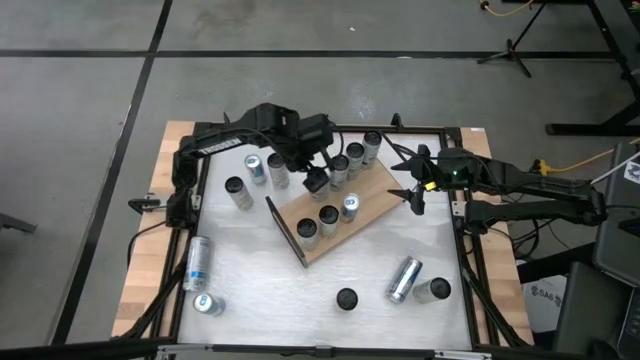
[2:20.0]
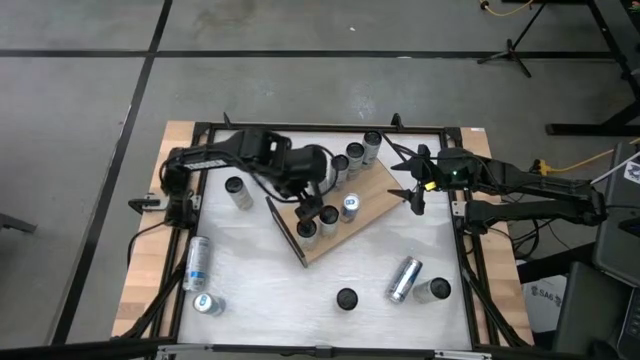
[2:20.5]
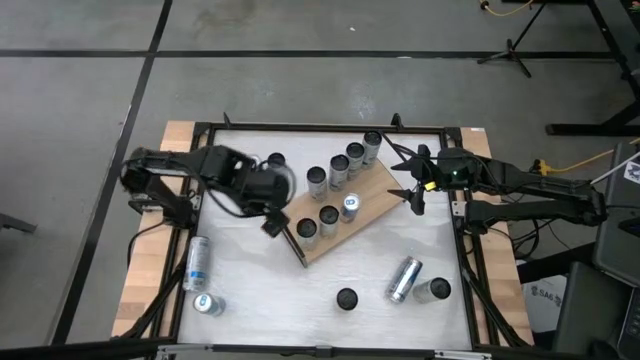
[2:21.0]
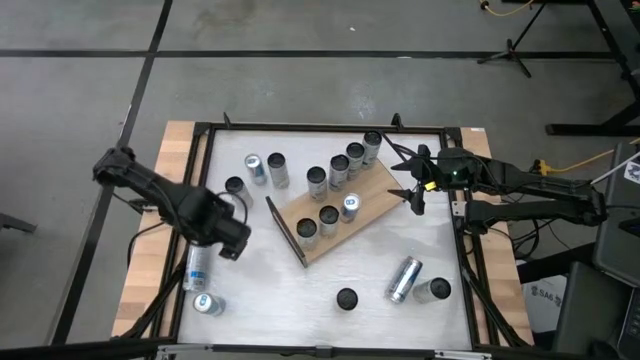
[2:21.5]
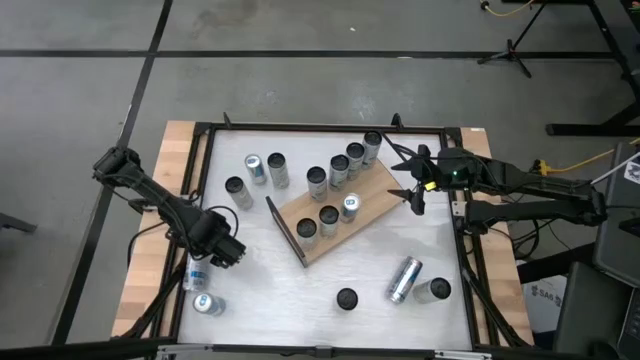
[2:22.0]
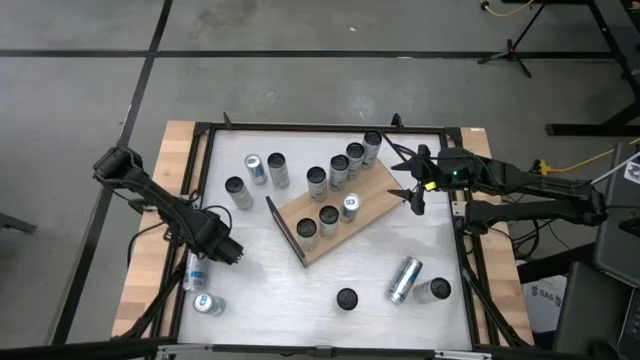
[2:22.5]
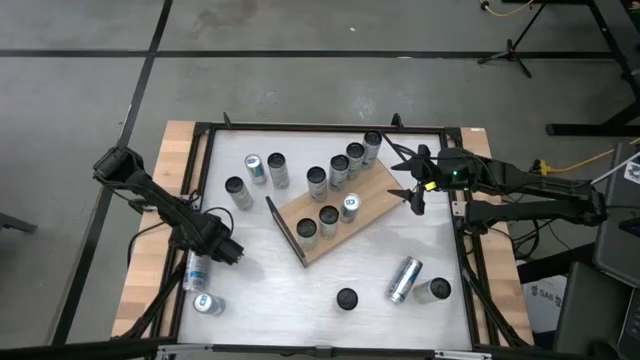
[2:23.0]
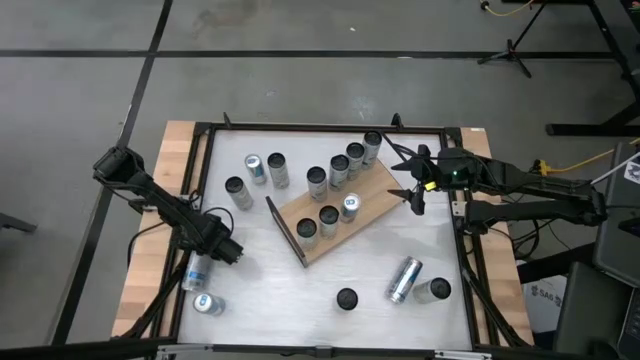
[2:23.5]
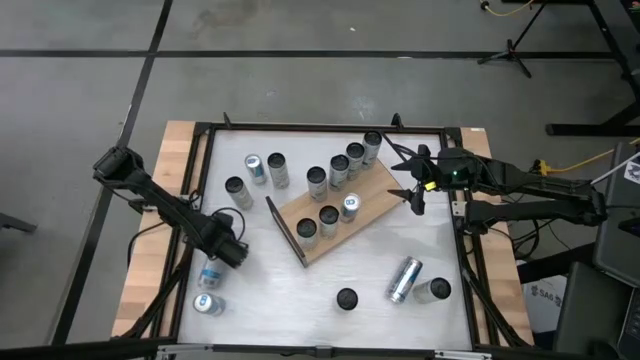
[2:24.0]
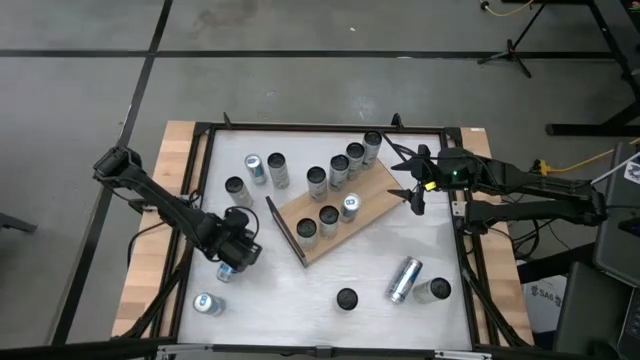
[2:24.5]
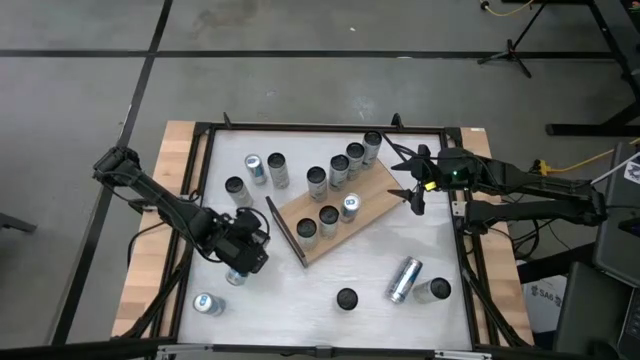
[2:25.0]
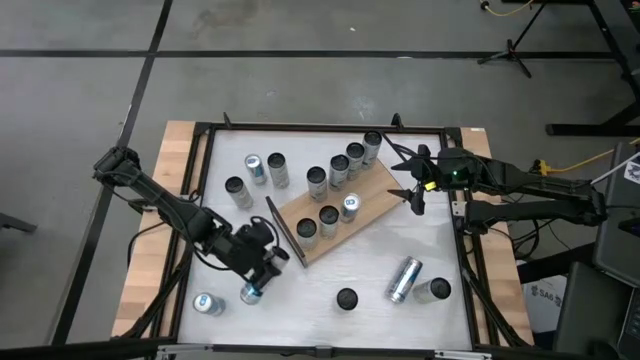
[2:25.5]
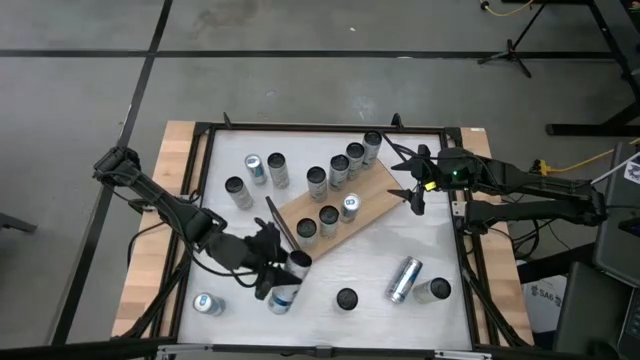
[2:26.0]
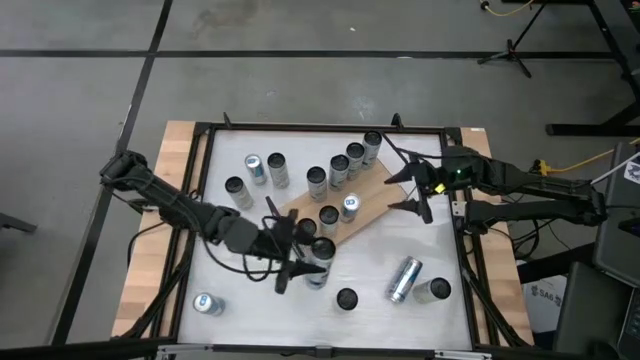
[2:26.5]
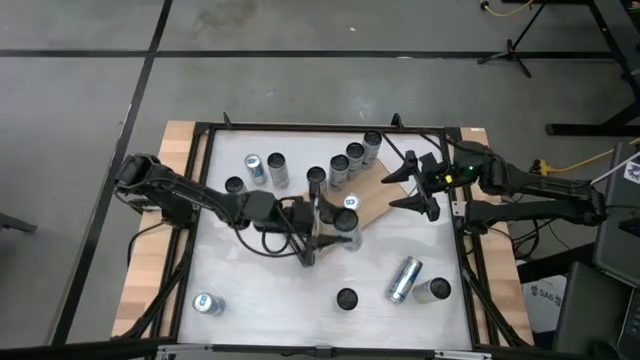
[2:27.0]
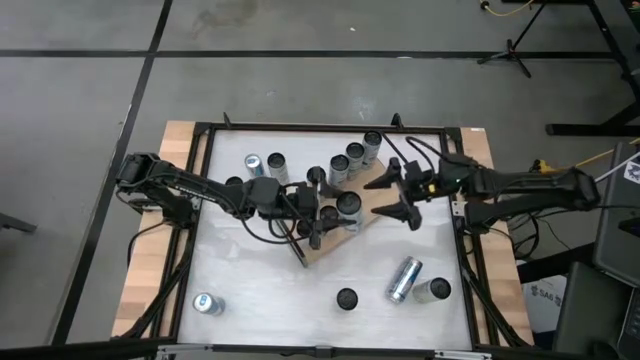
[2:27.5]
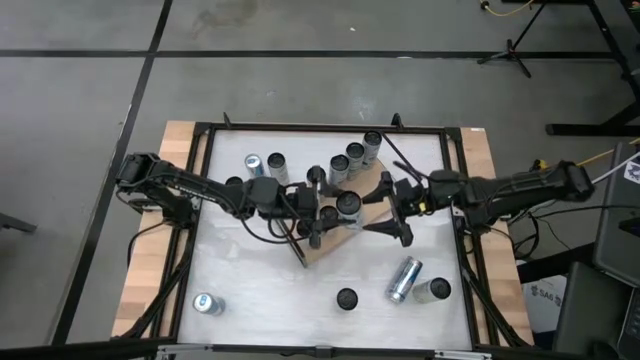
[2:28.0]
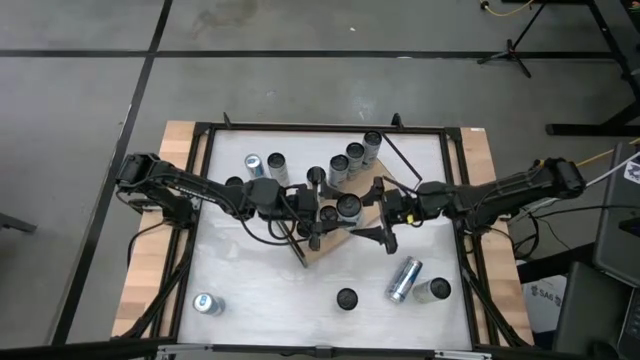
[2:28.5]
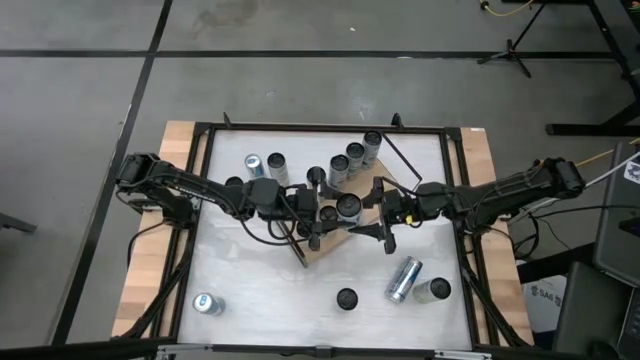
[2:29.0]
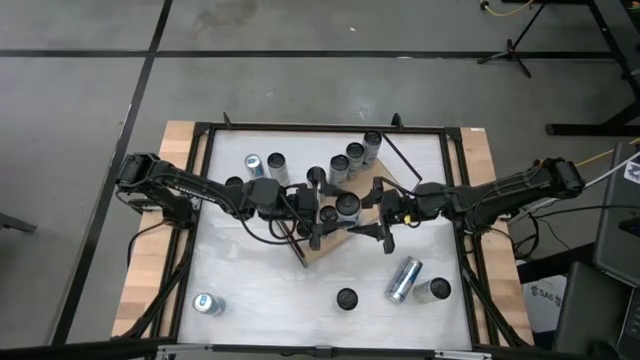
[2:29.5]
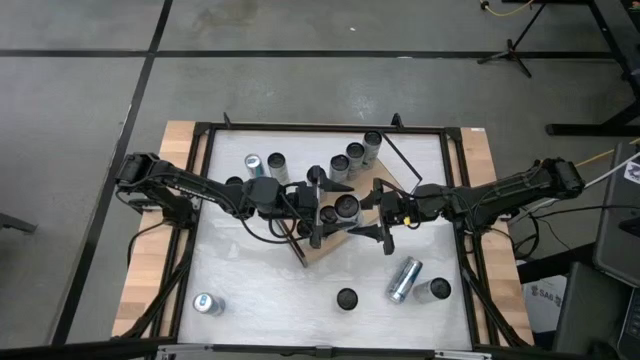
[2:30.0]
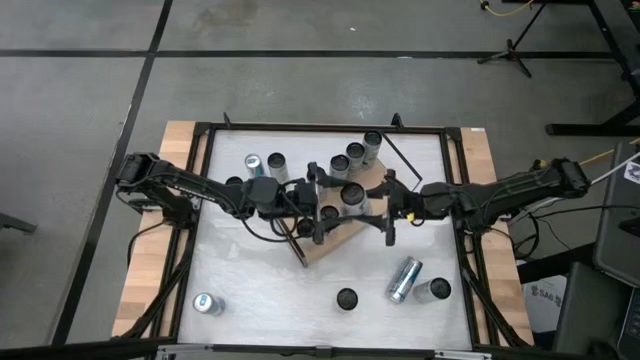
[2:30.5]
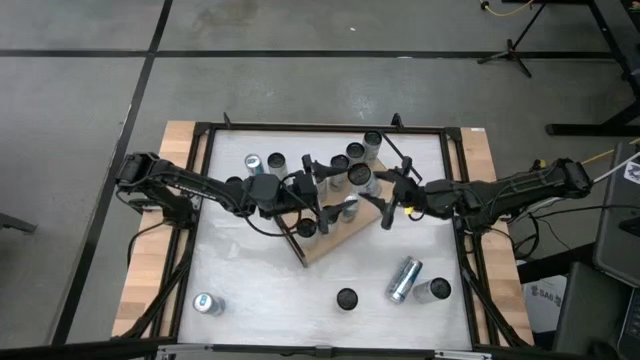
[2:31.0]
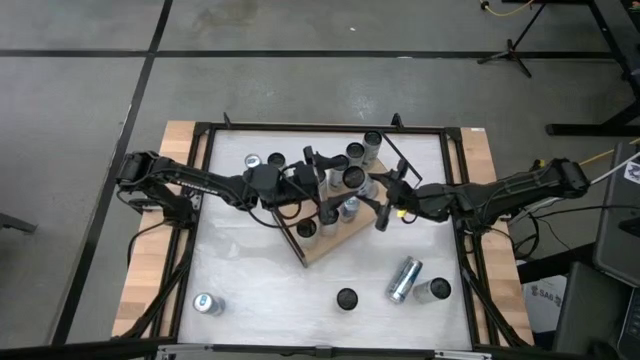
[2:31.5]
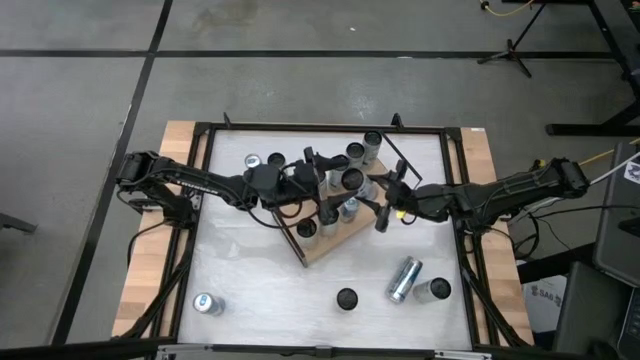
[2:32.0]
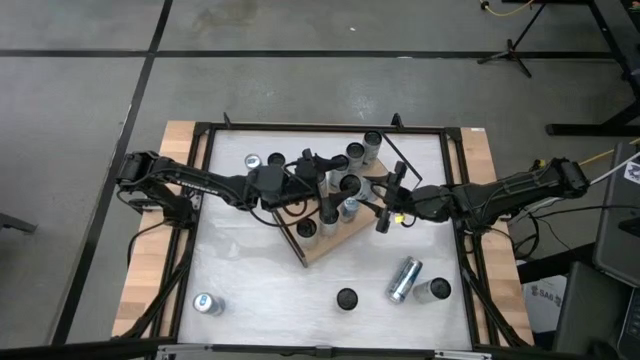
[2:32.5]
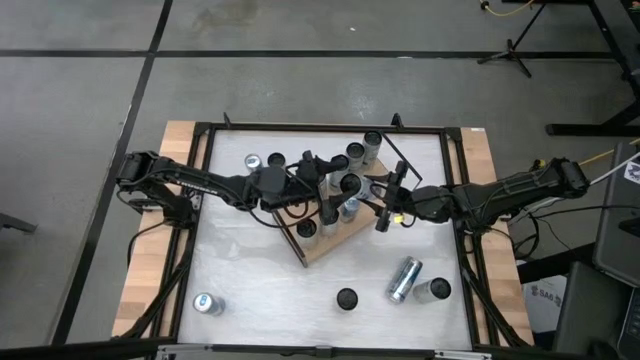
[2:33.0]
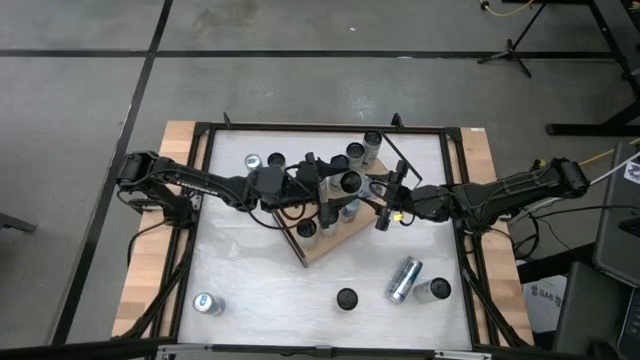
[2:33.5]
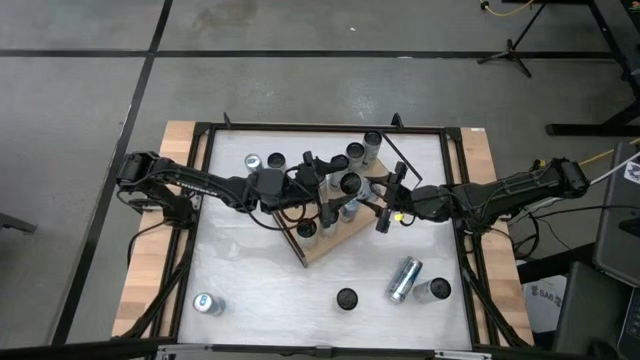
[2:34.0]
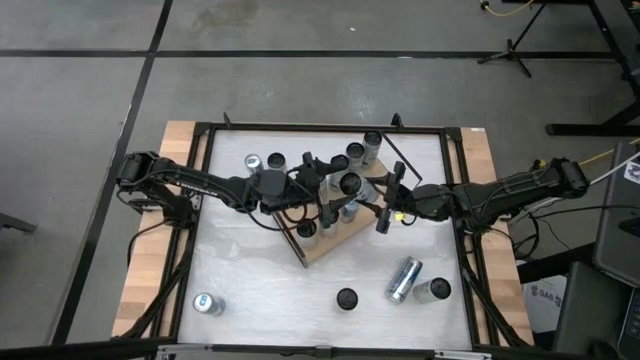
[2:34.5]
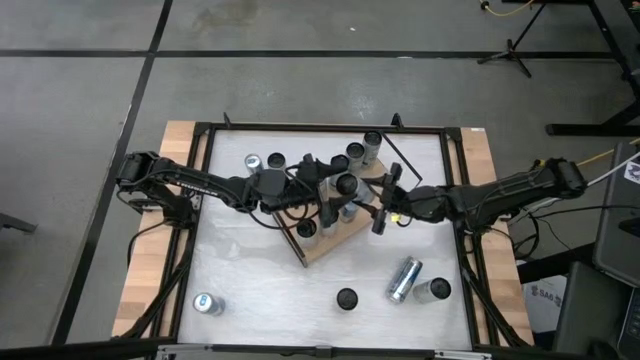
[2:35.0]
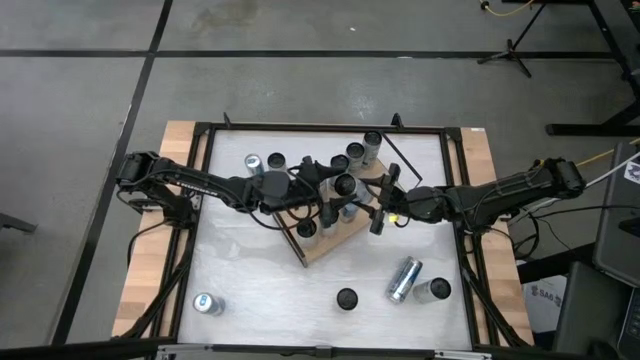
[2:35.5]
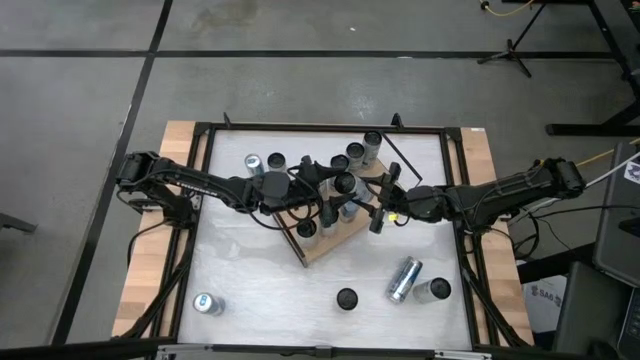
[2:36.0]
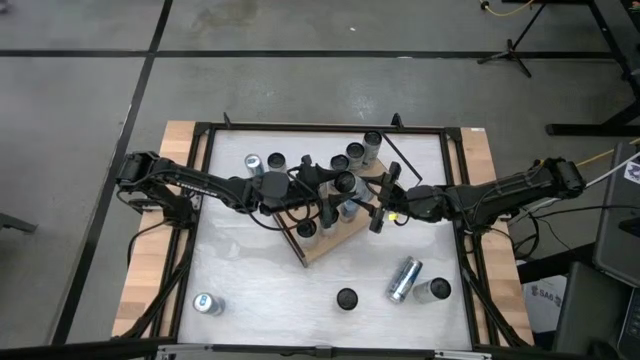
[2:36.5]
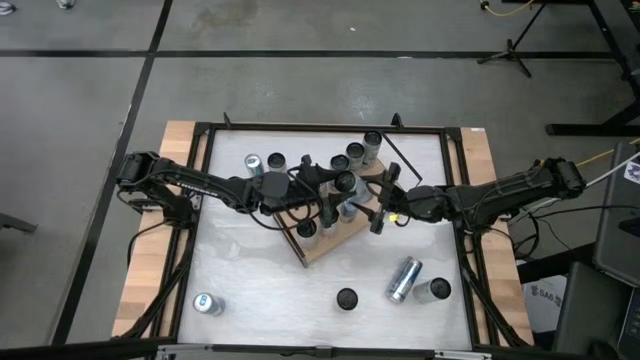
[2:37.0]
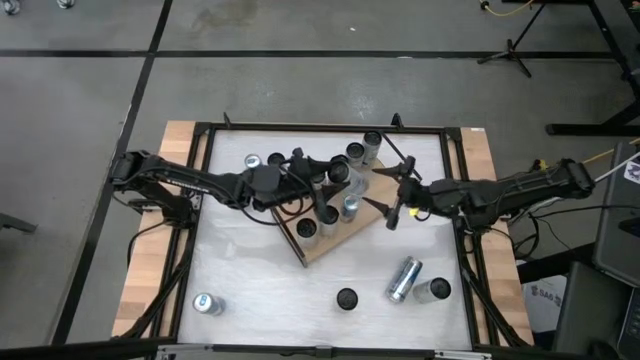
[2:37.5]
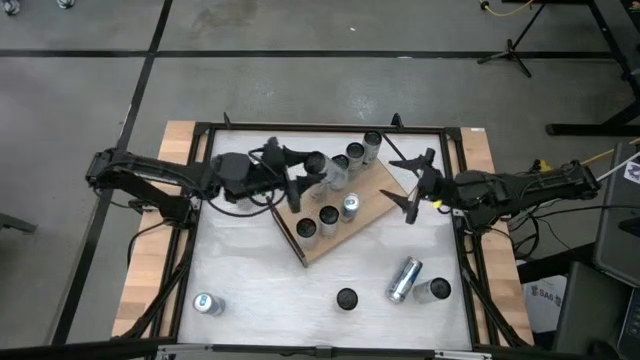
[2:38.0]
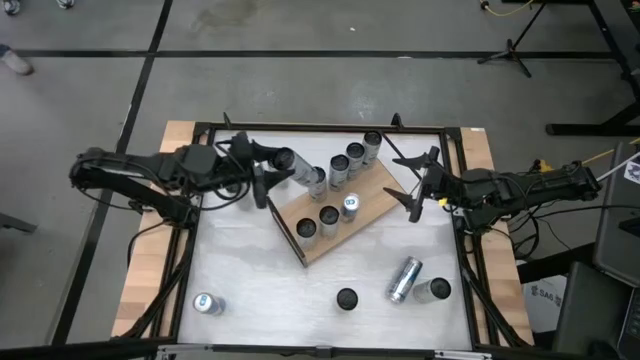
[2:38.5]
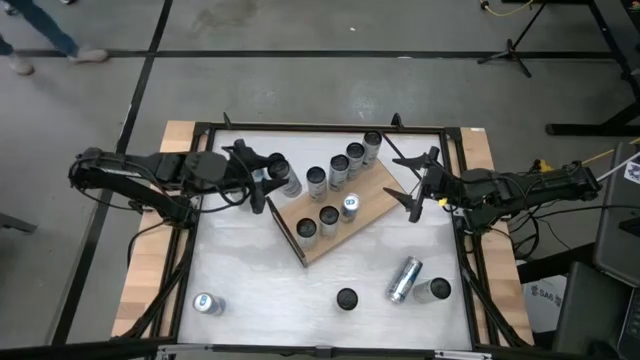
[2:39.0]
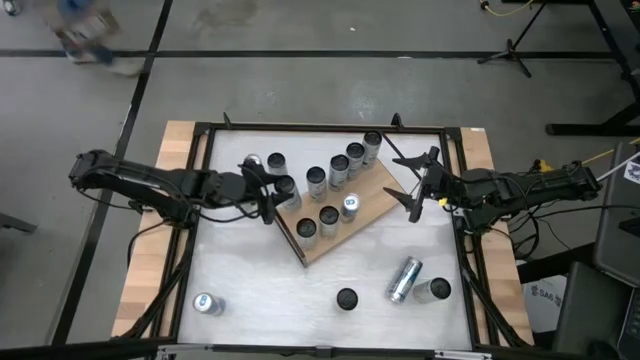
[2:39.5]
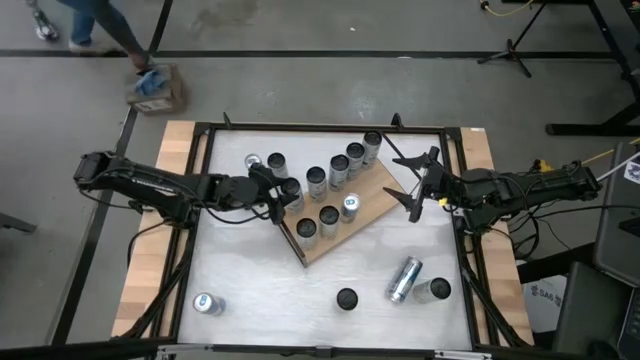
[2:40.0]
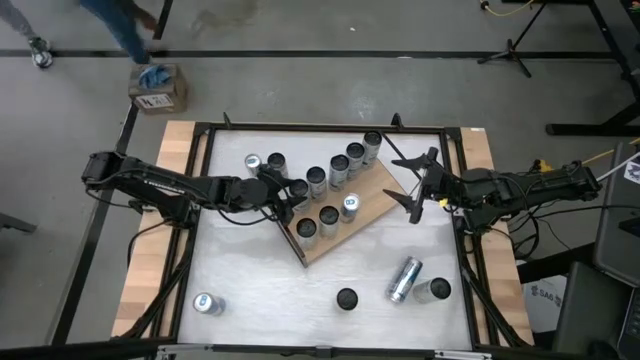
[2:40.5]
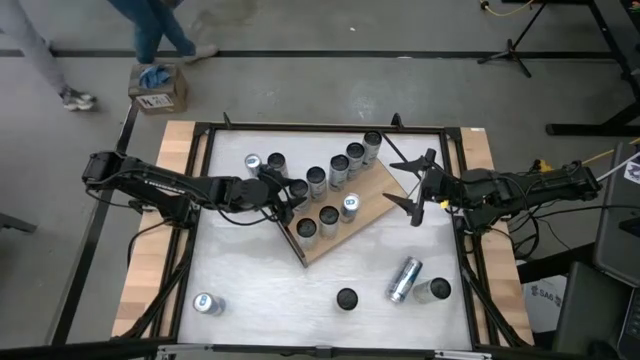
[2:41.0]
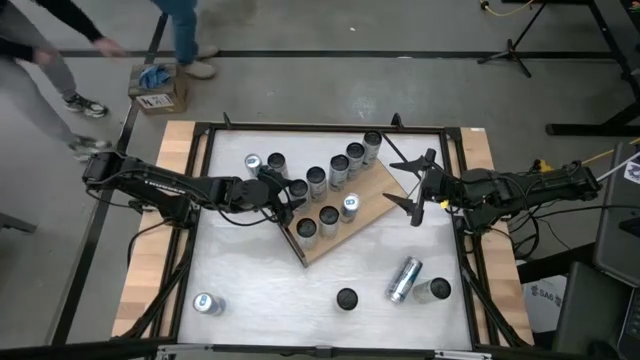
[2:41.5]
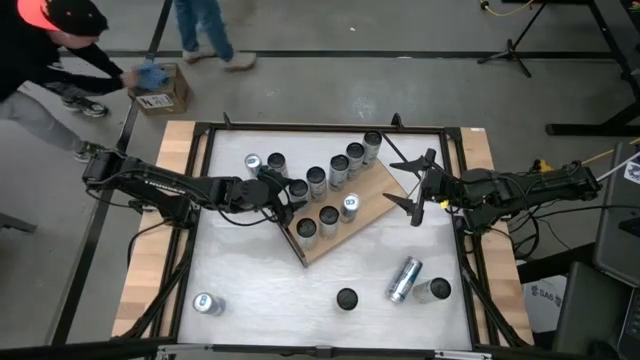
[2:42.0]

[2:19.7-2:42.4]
Task: Place canned beverage on shelf
Put the white blue soda can on the shelf
